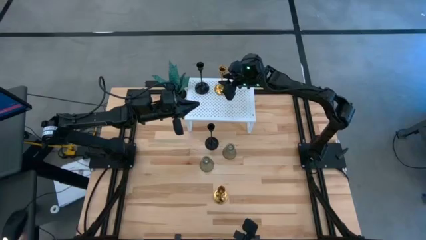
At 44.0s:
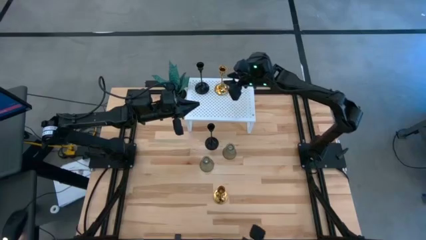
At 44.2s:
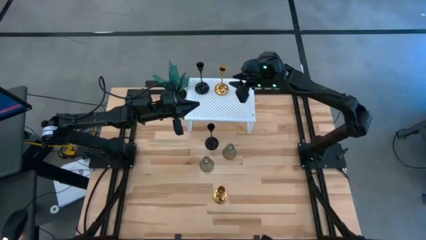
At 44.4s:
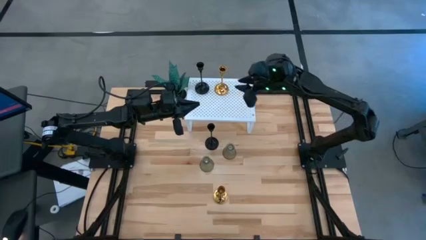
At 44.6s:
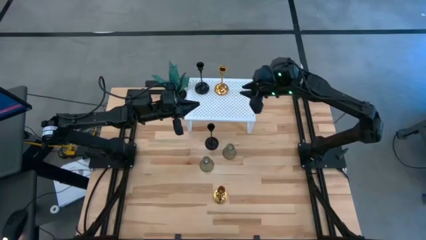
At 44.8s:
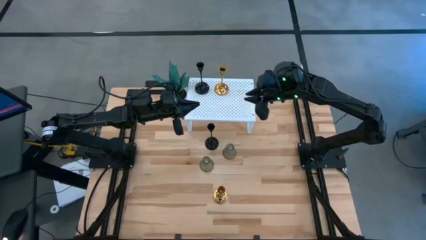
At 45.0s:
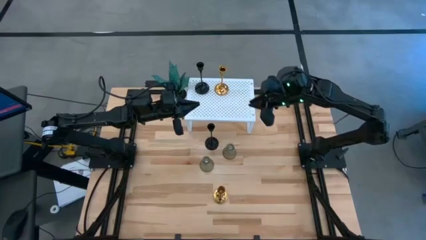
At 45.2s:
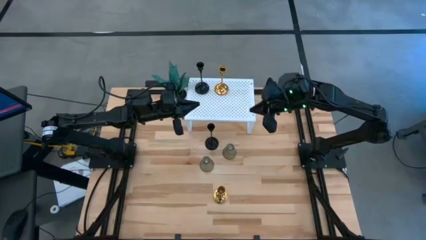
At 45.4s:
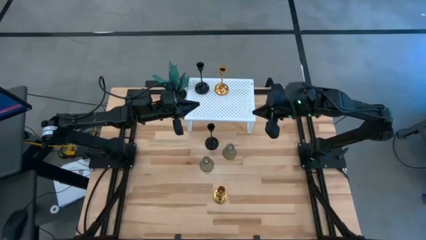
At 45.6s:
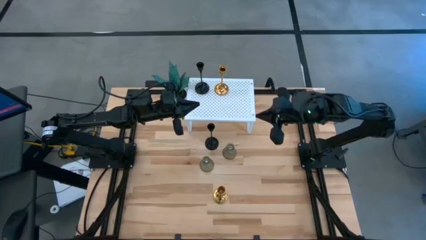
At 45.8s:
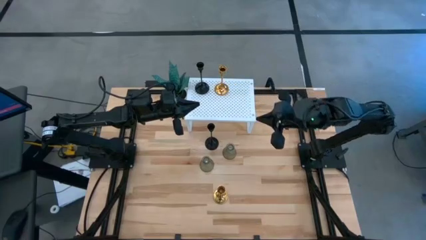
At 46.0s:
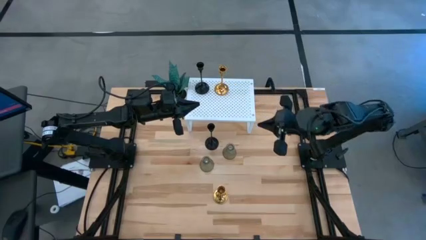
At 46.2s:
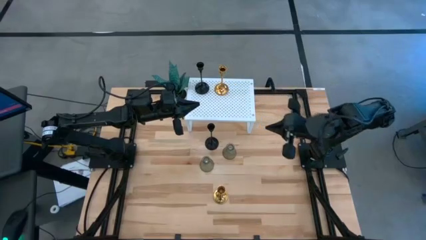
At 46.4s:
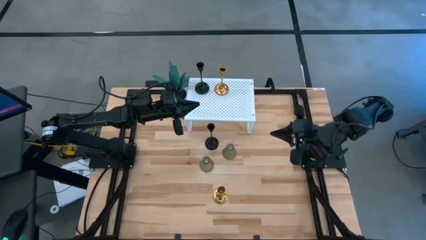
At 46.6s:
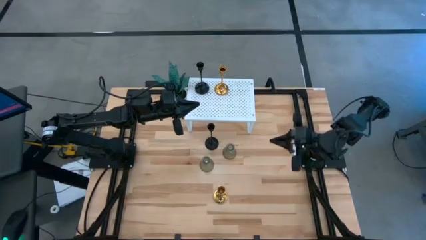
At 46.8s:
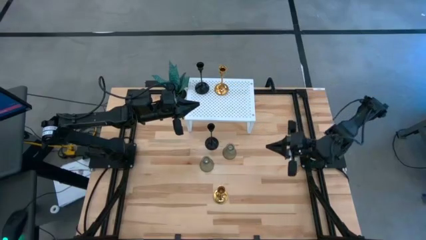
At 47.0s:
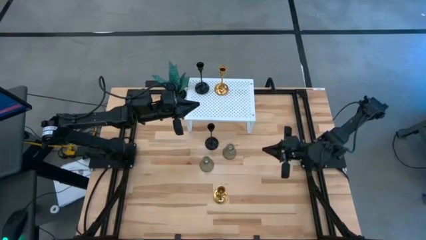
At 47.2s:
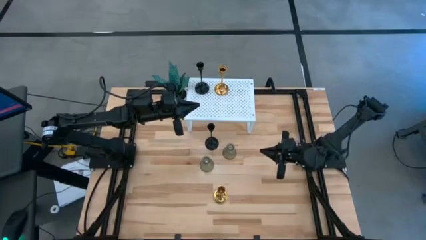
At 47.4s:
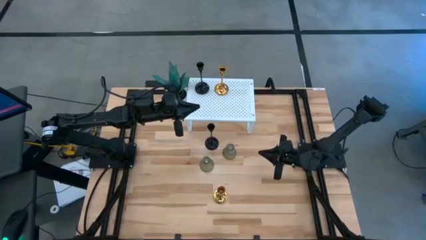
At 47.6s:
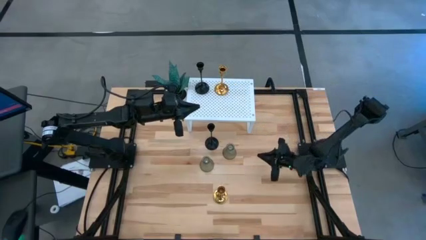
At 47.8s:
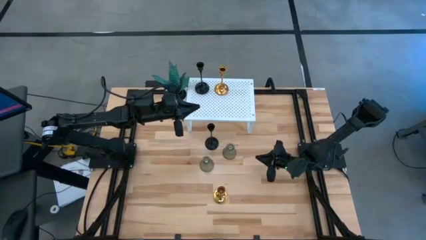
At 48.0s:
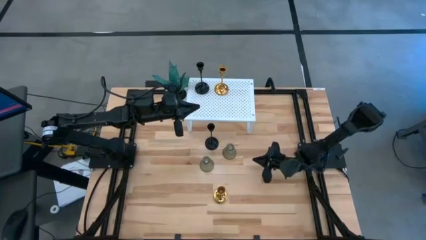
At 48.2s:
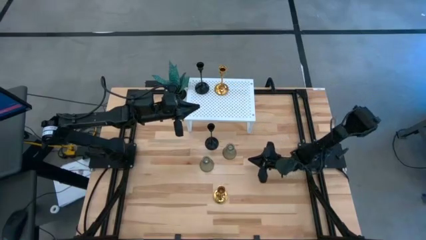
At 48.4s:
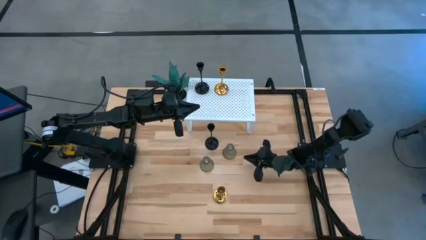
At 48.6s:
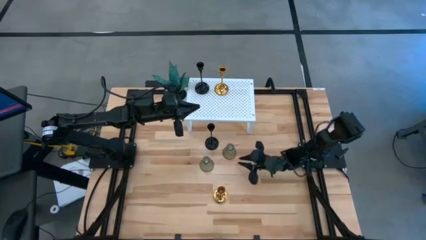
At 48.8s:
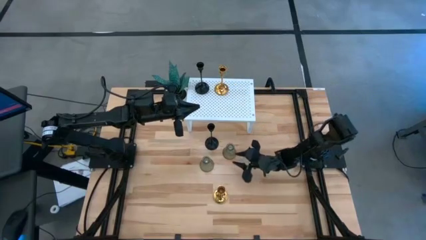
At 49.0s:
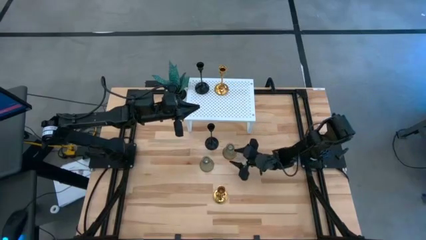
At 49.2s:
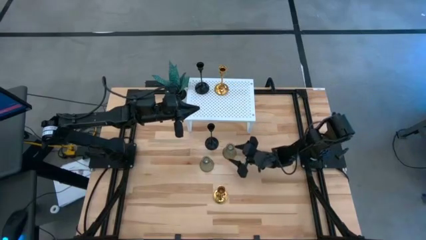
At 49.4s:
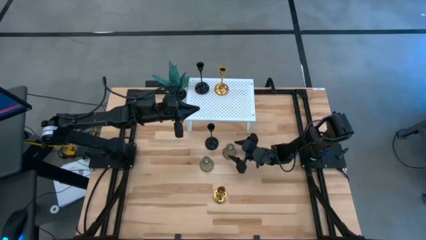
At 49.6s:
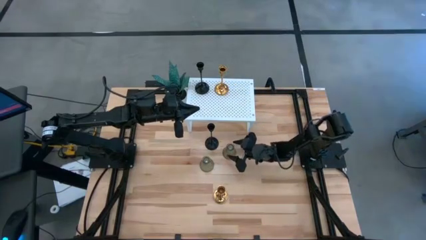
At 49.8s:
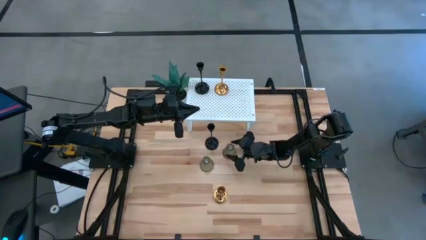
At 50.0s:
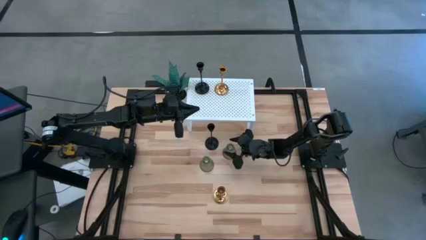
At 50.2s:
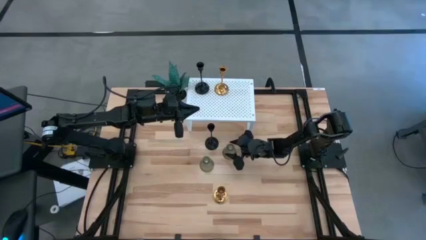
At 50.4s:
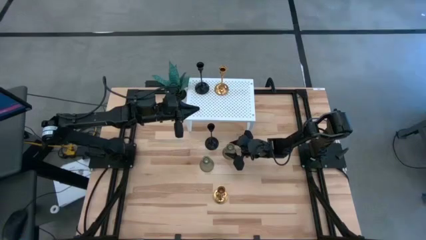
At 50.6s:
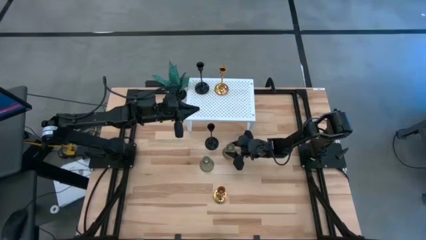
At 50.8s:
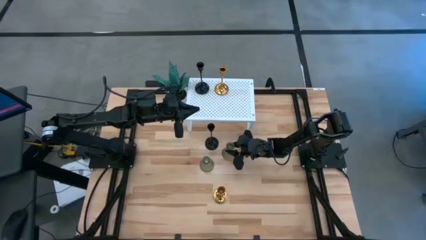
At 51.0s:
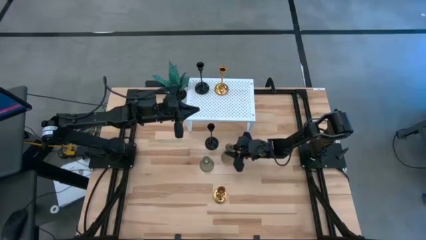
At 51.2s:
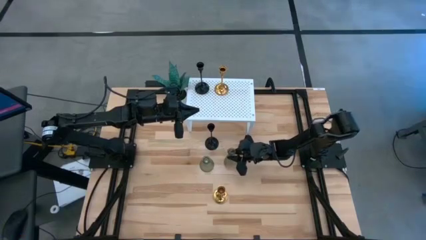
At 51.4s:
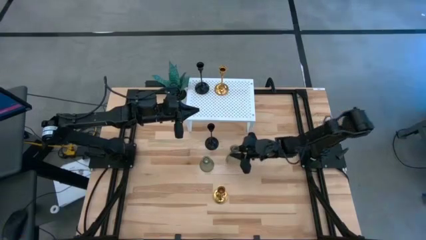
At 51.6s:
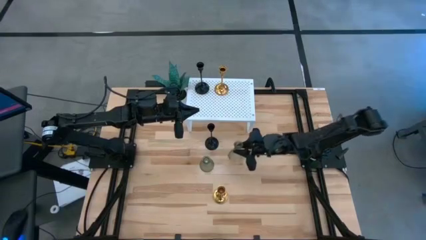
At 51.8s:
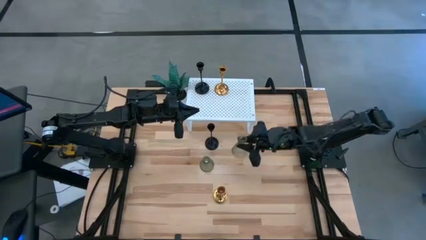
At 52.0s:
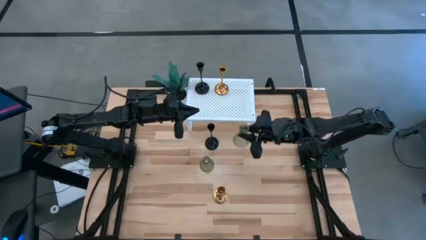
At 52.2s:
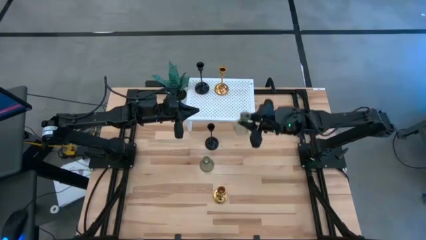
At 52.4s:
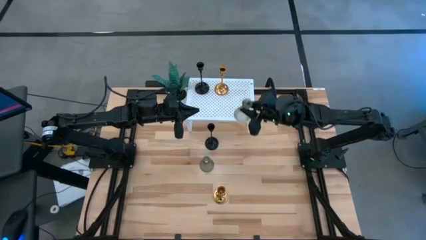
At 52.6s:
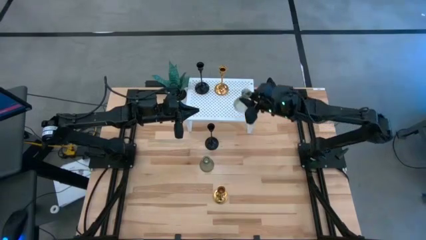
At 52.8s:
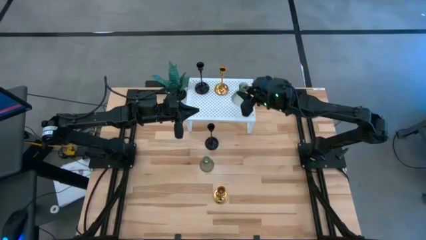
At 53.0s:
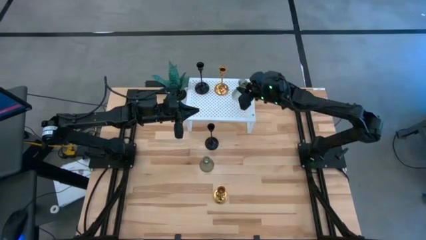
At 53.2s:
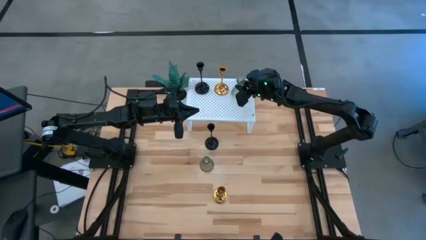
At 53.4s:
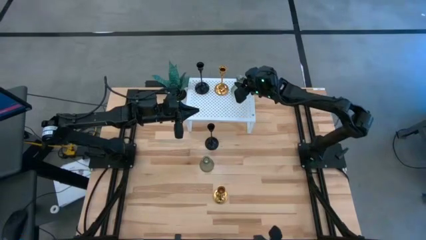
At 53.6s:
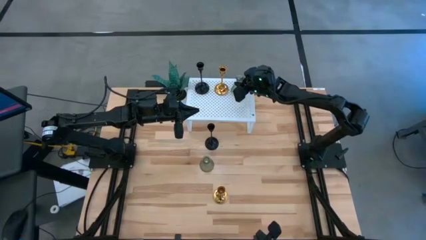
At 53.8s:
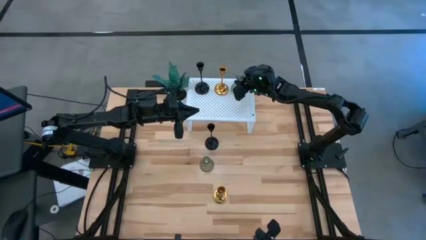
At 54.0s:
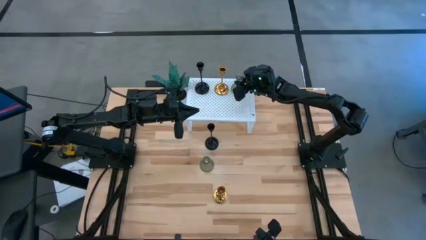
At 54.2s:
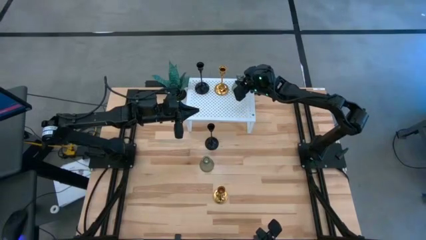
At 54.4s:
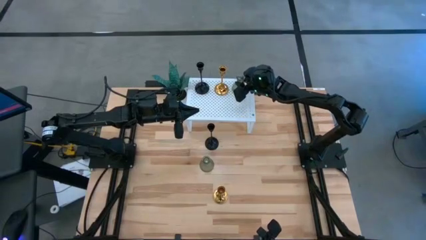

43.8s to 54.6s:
Task: Pick & Place candle stick holders
Put the right green glass candle holder on the shelf

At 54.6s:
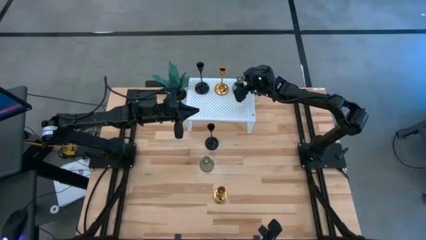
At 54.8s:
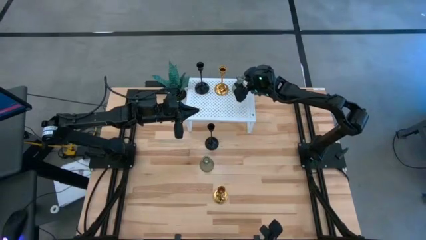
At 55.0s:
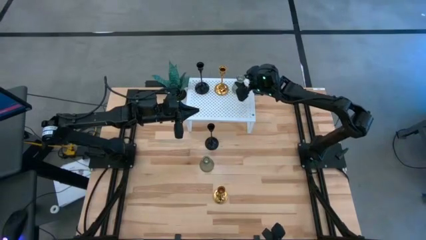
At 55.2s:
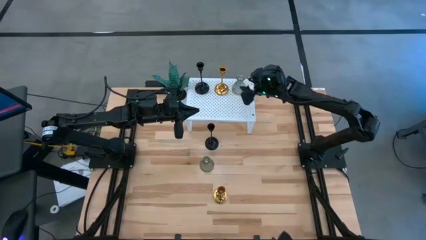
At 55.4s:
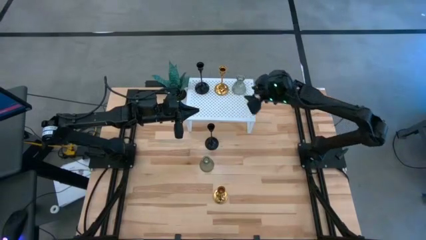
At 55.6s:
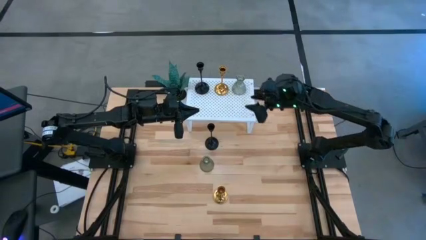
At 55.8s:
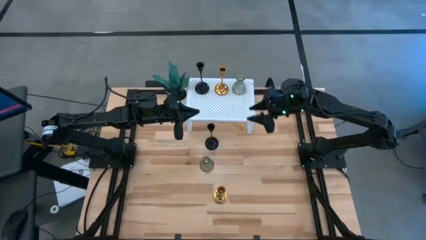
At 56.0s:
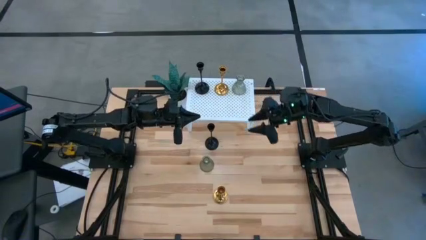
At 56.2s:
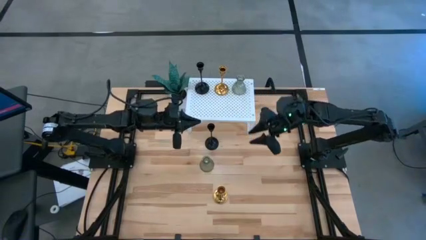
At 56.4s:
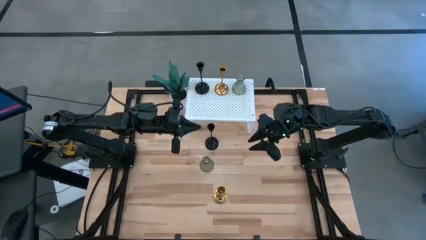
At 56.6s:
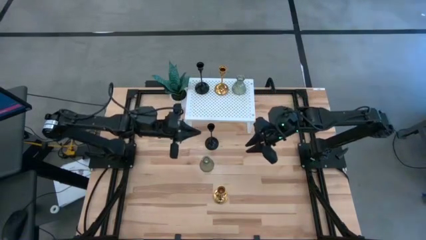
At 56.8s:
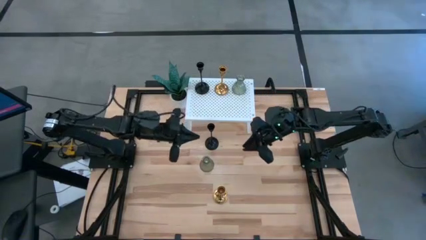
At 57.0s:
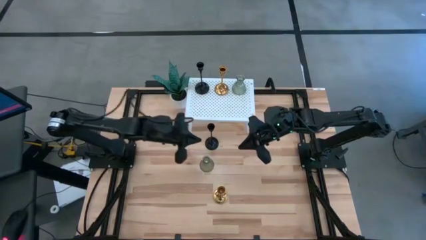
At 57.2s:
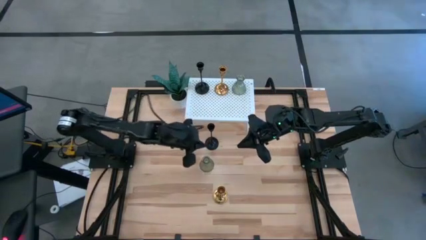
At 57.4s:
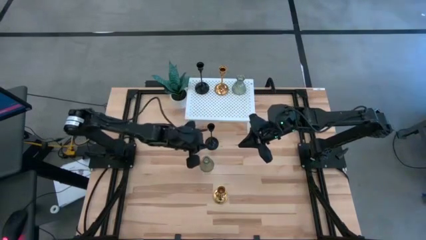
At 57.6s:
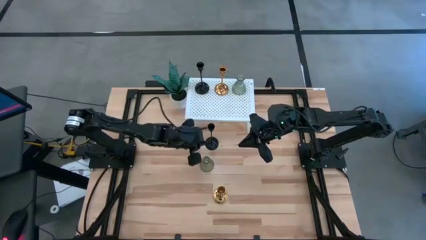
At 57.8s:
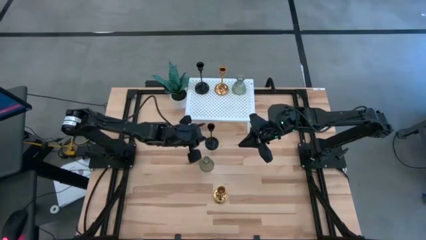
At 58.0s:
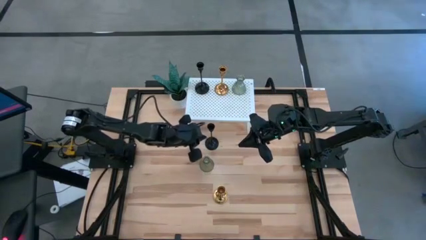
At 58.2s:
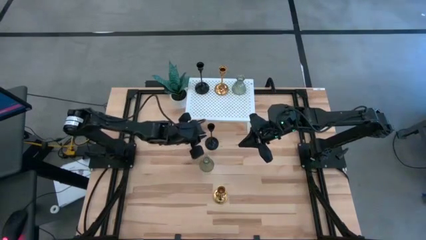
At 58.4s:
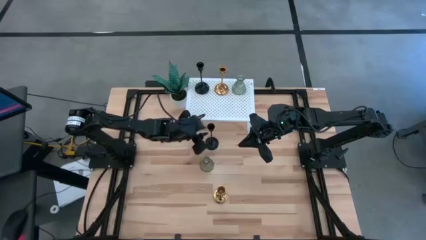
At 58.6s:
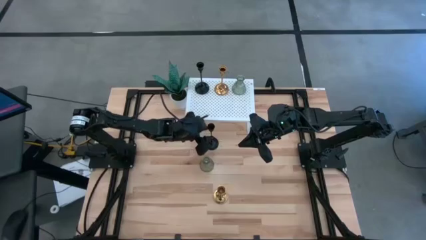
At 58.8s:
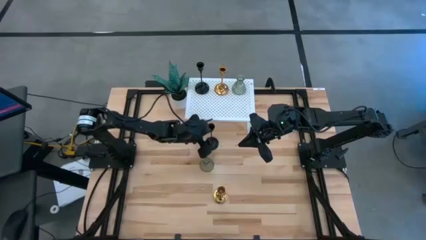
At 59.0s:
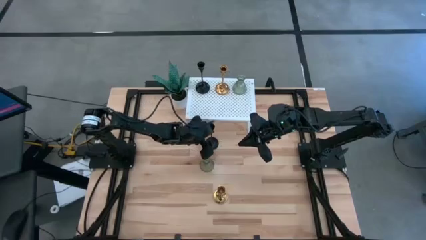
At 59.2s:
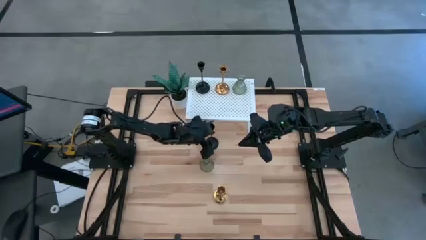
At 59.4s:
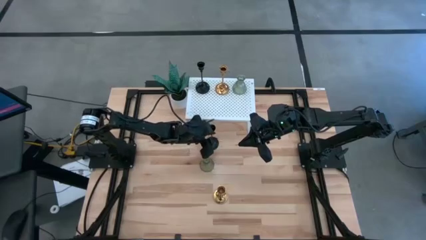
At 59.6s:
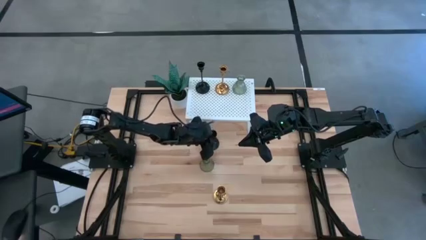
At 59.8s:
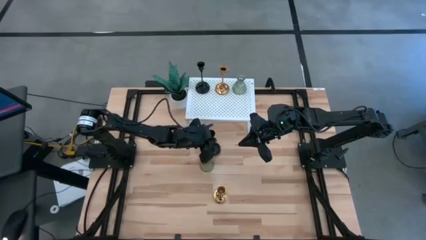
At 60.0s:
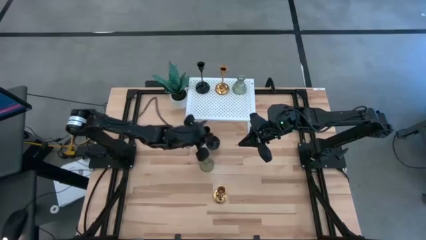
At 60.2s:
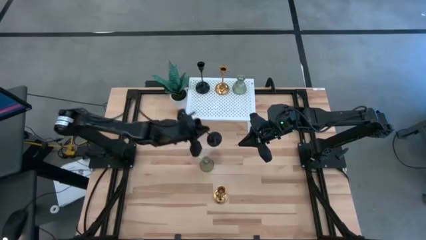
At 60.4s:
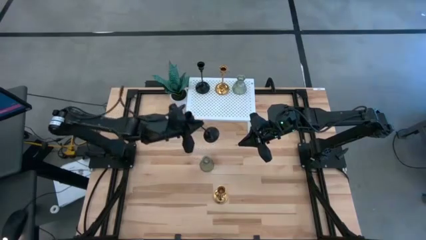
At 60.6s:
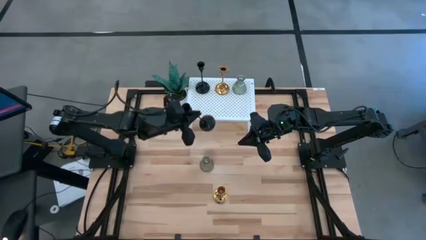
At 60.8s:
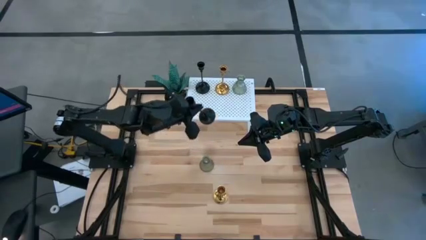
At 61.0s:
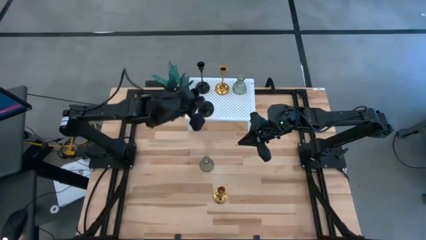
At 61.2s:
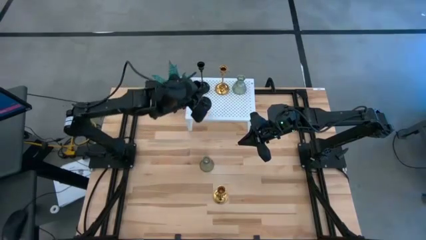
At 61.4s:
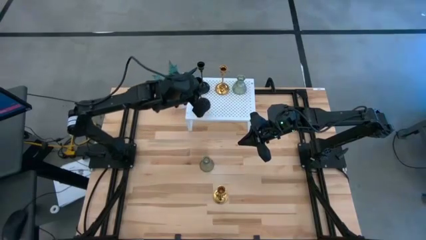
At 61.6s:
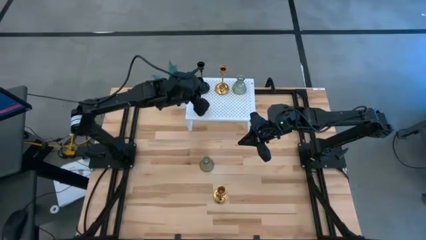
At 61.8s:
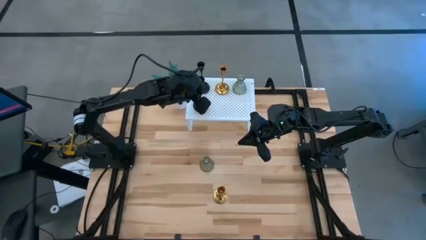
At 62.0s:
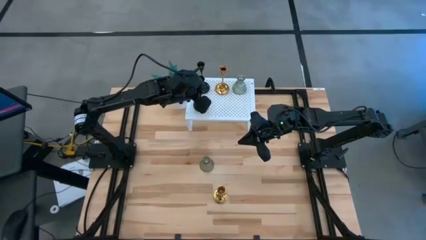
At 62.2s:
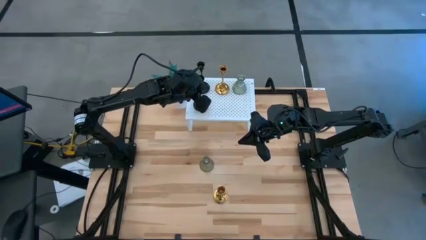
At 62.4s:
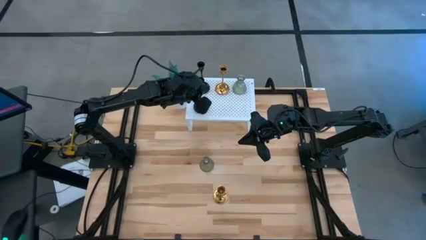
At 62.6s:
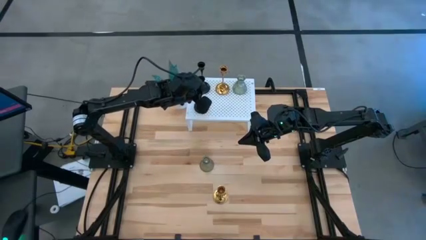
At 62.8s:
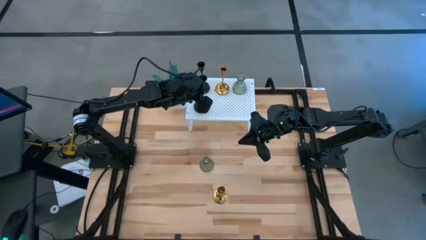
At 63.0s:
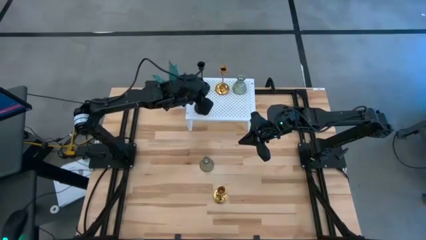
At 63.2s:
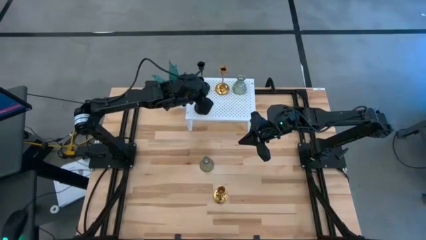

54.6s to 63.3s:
Align the black candle holder on the shelf with the other black candle holder
